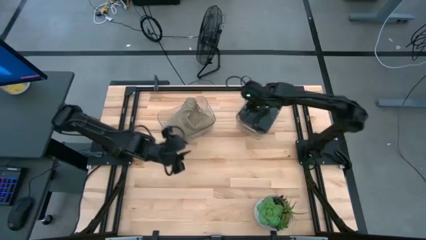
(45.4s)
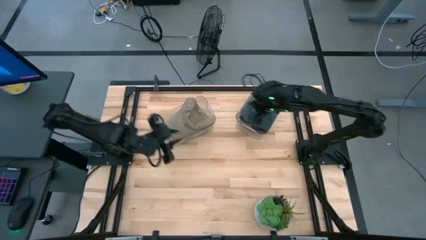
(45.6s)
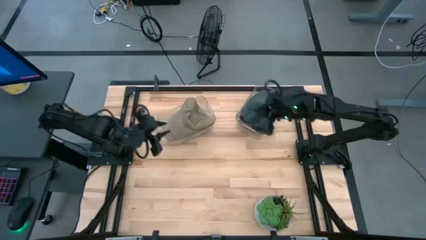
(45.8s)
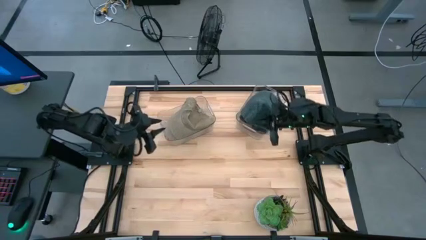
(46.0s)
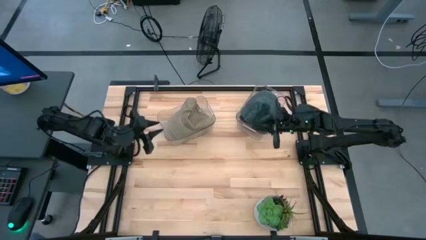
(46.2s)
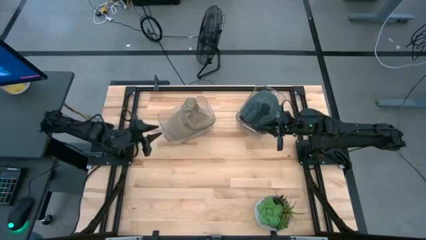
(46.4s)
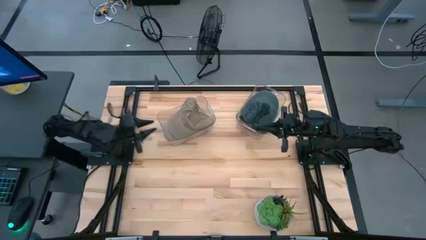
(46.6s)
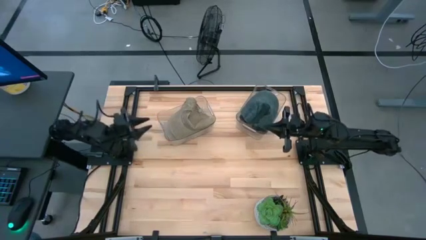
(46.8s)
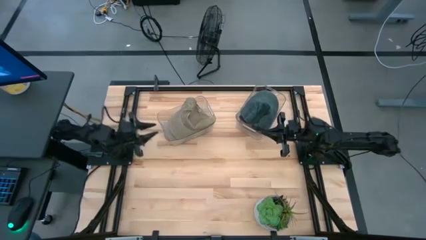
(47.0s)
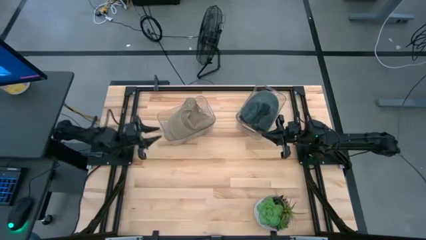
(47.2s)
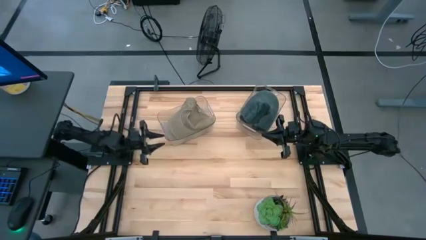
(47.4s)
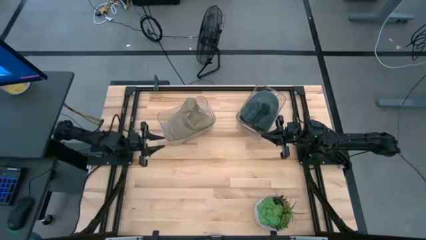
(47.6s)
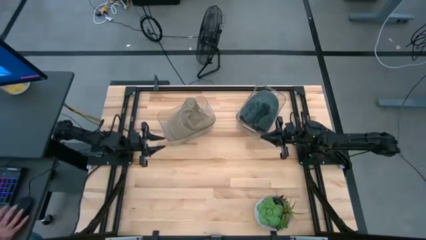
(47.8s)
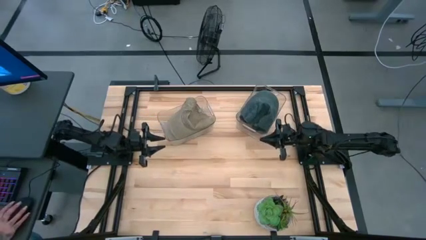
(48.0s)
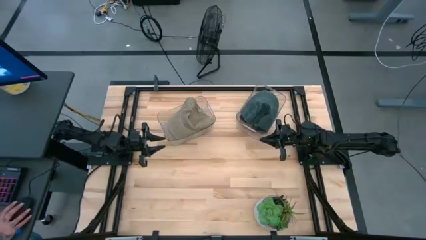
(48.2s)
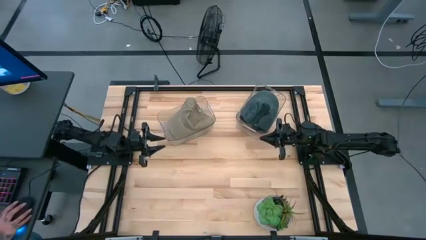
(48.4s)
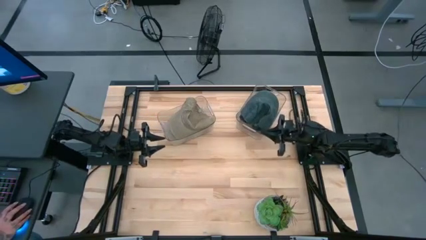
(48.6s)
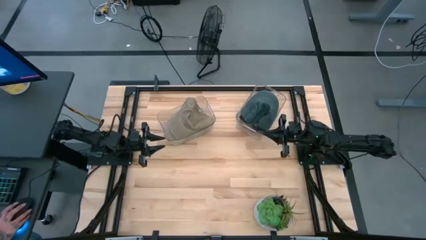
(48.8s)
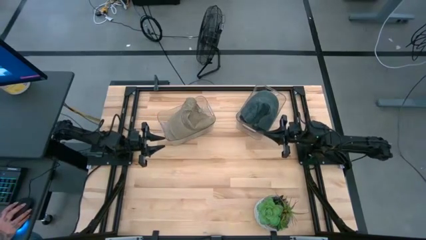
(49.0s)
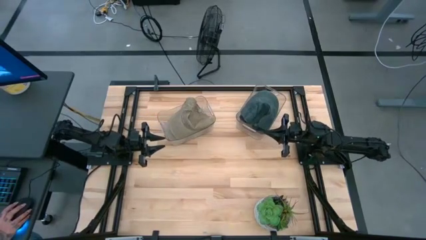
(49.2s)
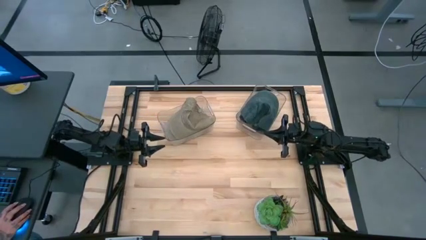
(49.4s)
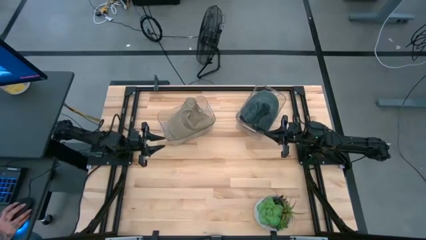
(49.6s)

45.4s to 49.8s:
Task: Pick & Place hat
Return to Home Position

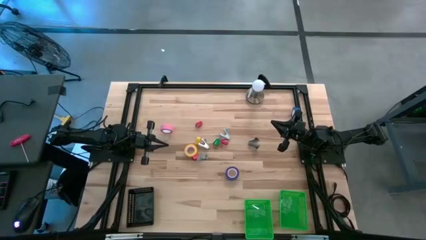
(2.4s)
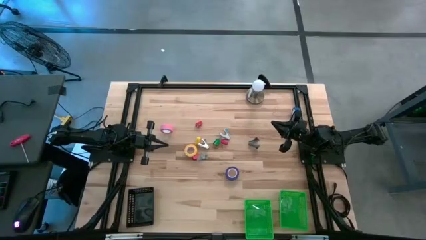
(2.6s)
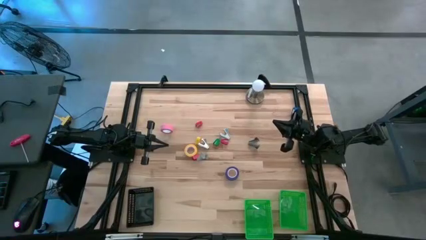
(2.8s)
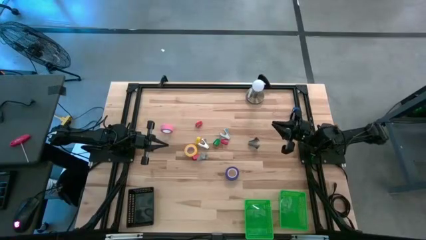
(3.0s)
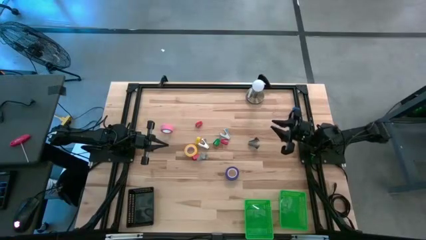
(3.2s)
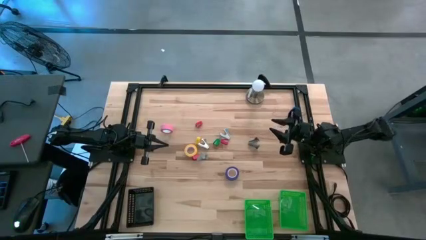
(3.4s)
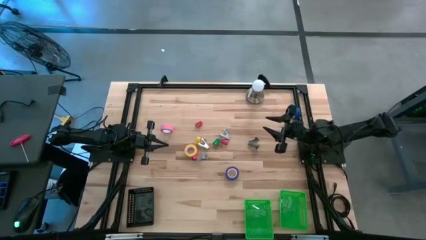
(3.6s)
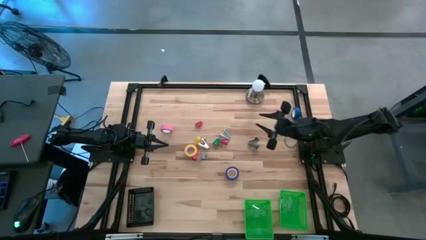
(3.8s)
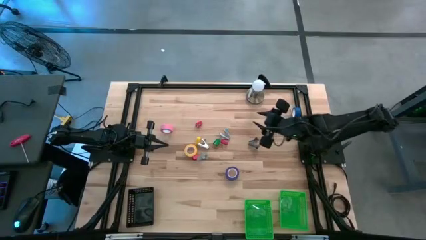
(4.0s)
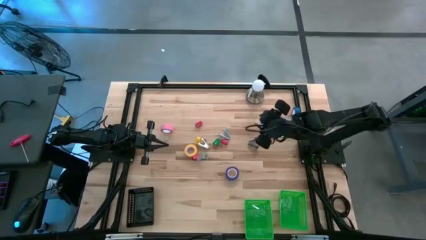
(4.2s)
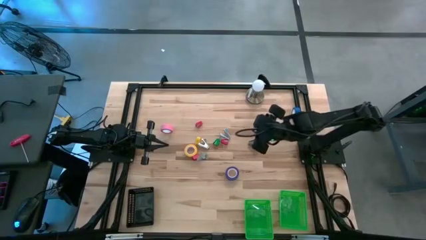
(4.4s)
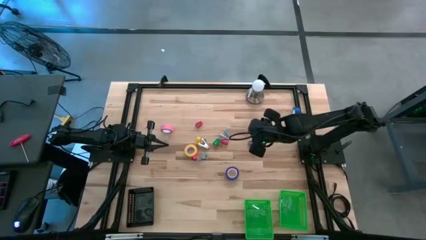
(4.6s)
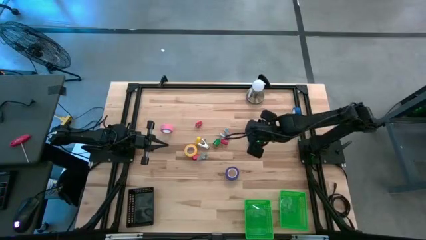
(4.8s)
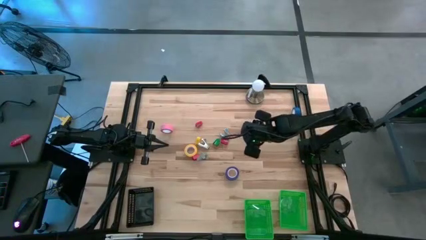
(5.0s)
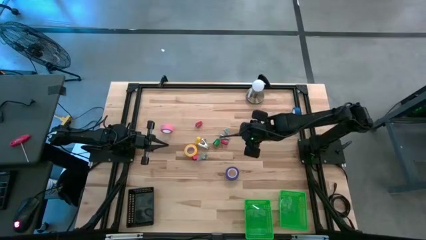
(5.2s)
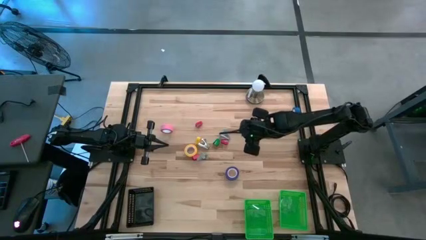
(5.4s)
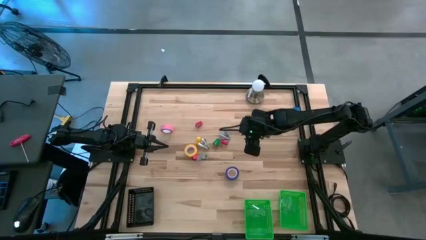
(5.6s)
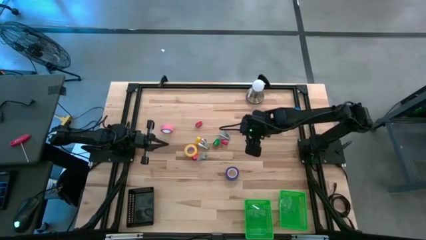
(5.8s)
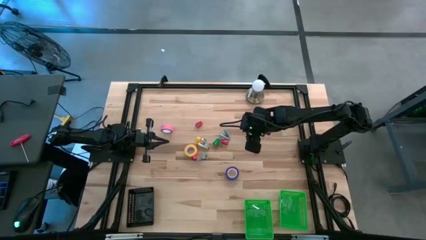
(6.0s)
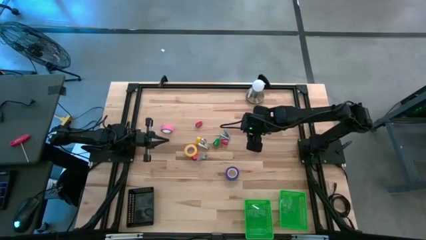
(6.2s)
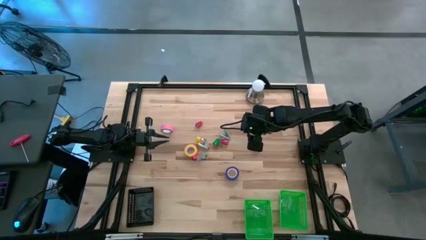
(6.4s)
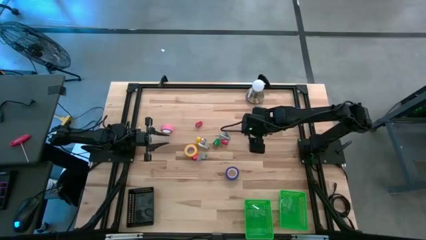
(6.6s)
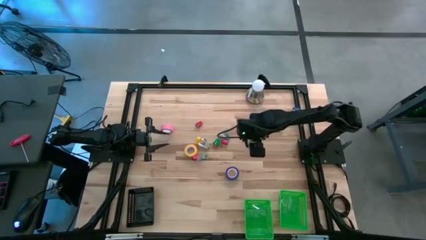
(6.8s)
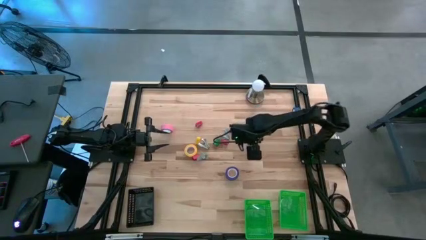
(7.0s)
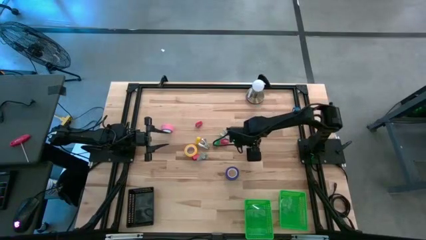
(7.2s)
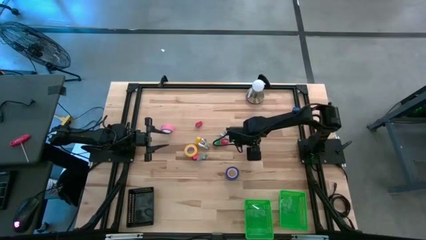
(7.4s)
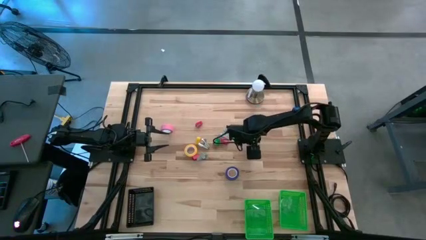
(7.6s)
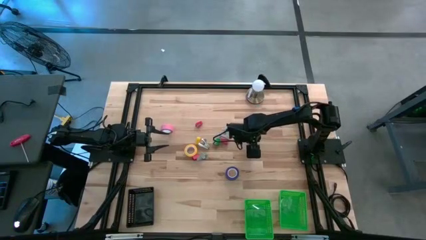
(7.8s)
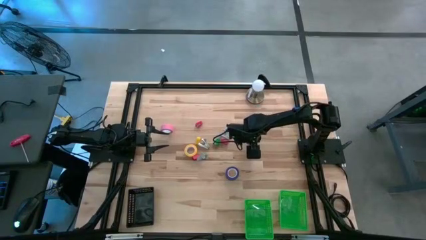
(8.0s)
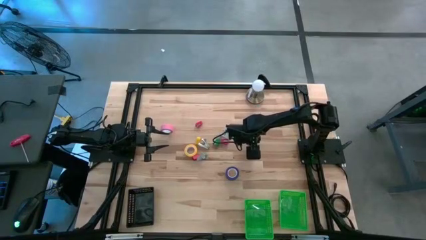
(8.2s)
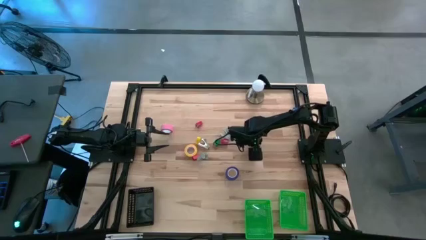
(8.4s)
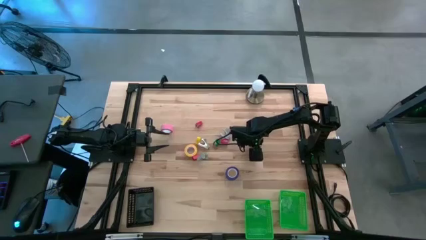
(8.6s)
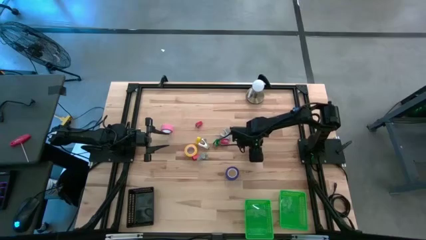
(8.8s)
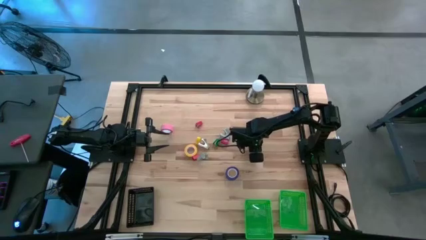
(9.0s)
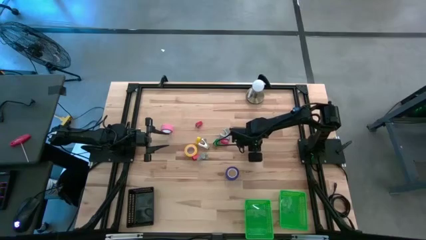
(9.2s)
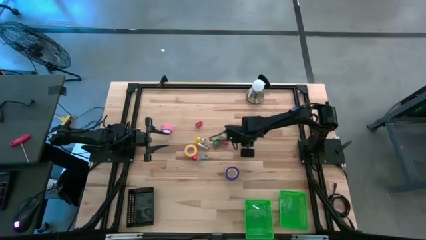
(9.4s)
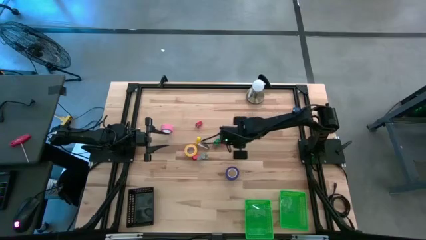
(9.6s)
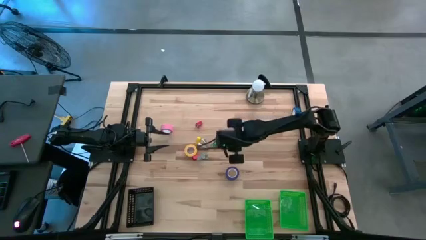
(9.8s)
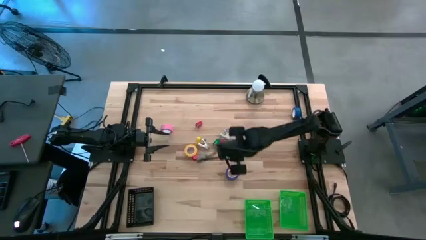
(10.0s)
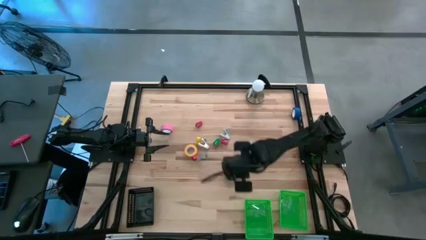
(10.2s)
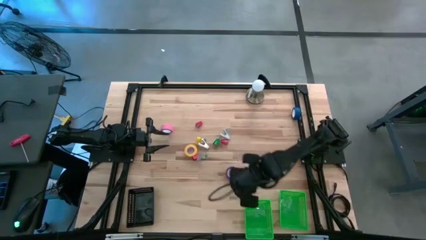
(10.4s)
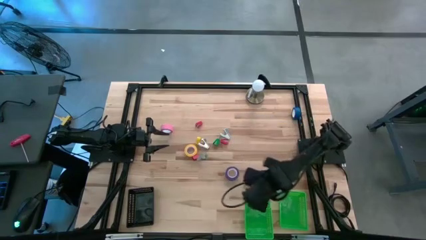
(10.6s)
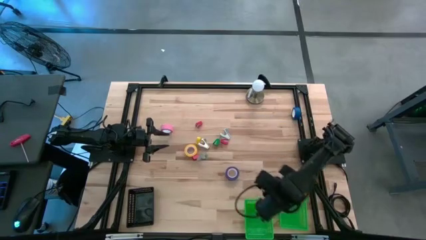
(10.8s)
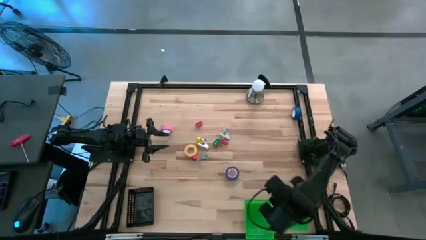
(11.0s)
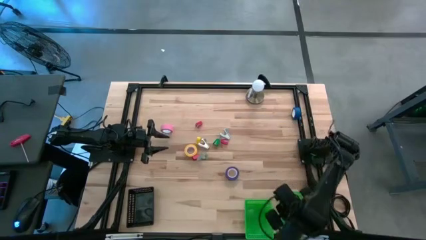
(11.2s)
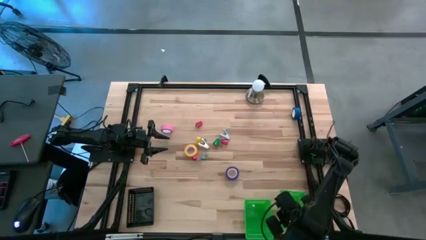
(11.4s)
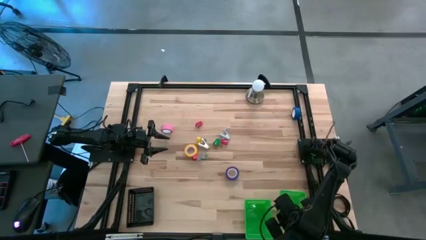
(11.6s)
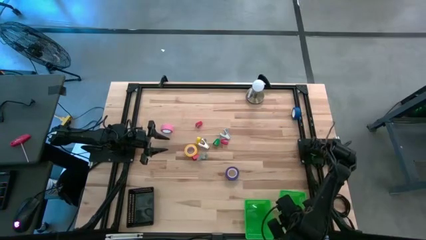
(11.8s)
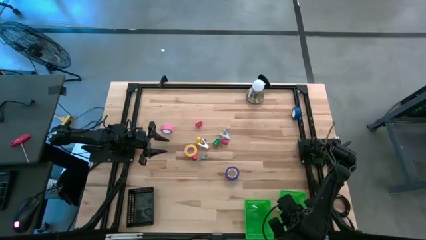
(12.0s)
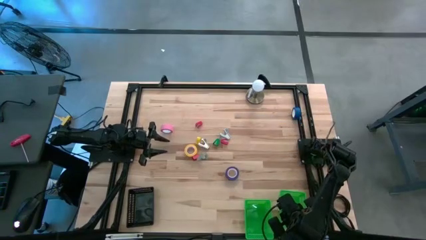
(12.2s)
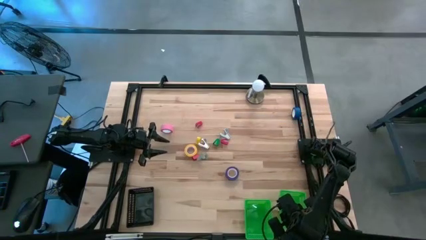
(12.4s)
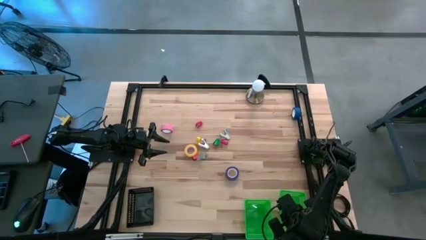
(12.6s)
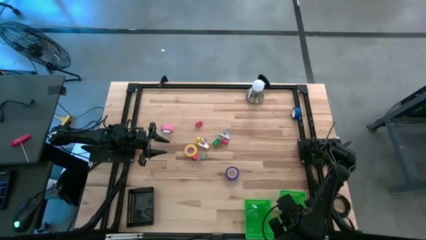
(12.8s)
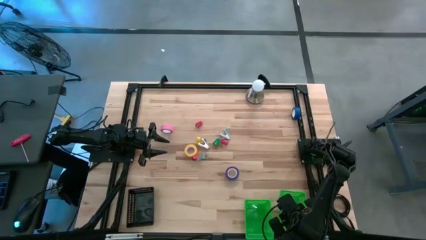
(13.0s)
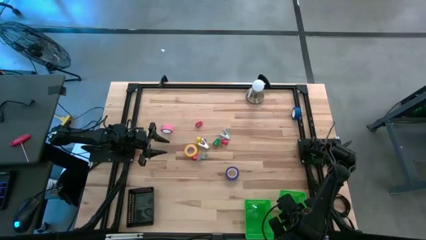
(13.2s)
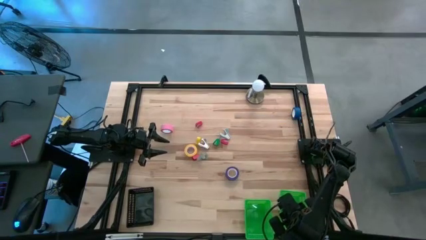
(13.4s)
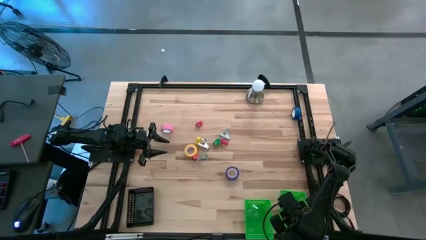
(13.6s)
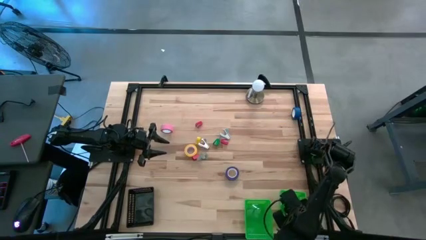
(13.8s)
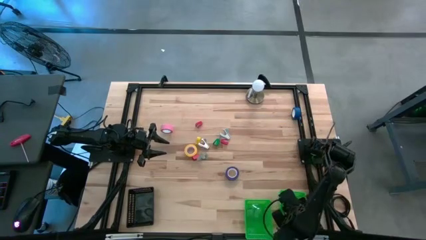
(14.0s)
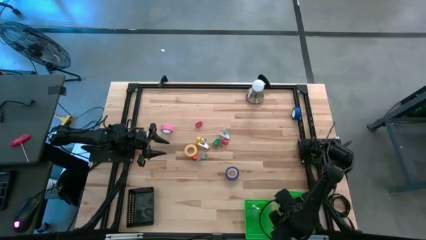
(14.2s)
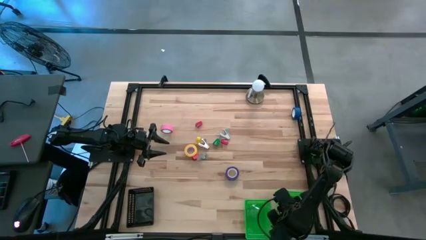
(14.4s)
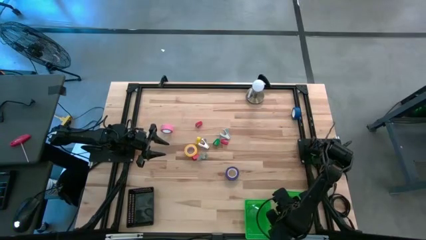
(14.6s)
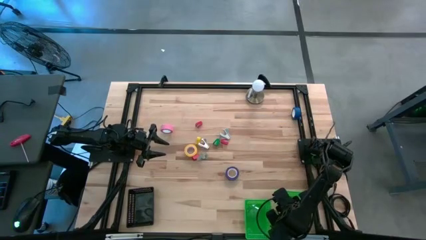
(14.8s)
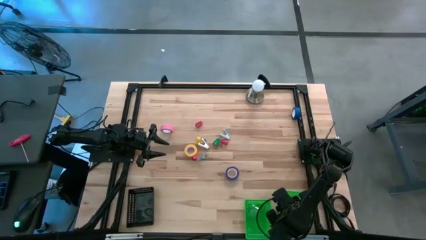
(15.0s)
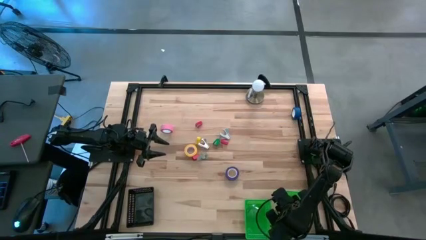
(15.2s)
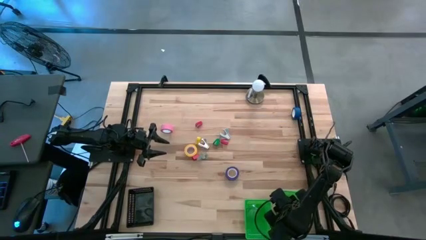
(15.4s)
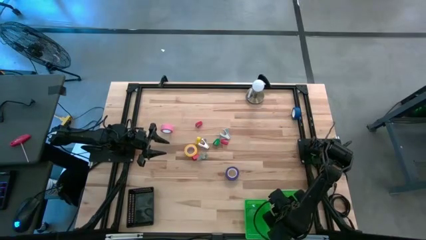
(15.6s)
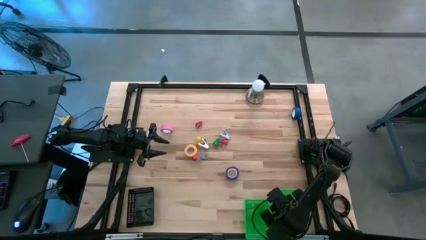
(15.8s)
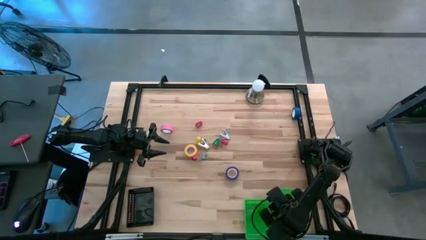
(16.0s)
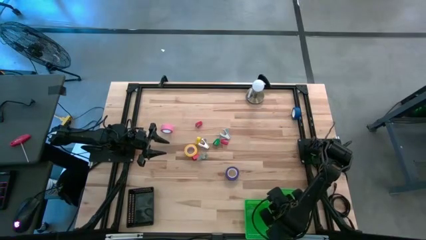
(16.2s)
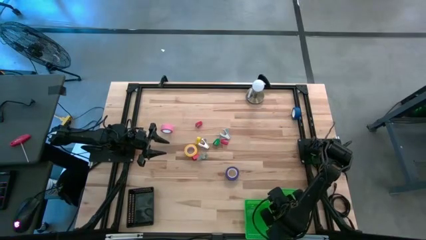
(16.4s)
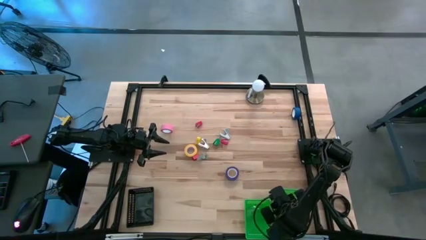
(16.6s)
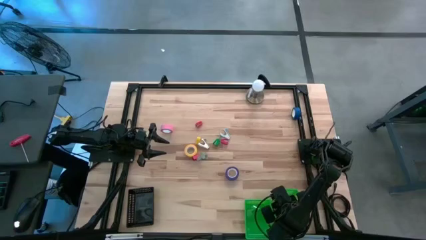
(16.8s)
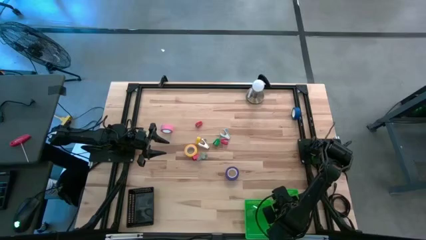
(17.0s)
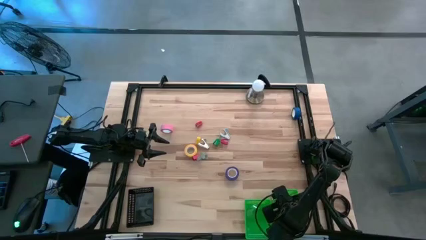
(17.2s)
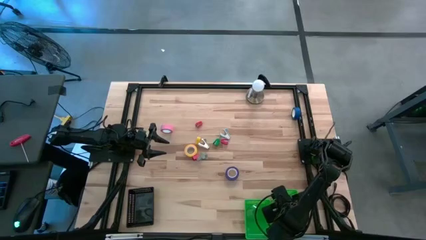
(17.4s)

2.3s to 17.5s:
Task: Pick and place Stapler, Stapler remover, tape
Put the black staple remover into the right green bin
